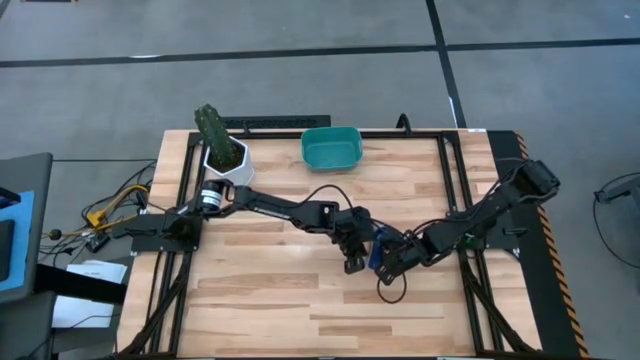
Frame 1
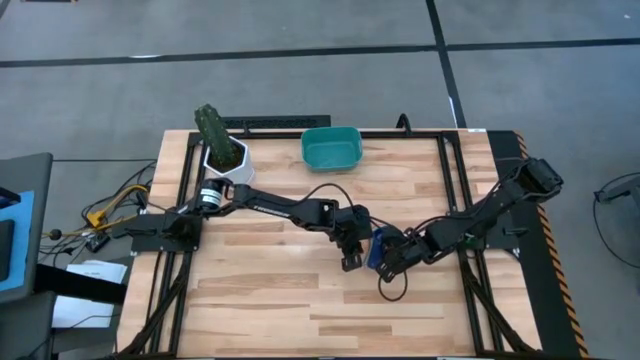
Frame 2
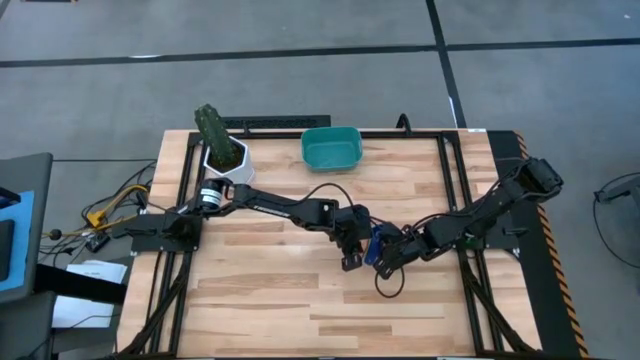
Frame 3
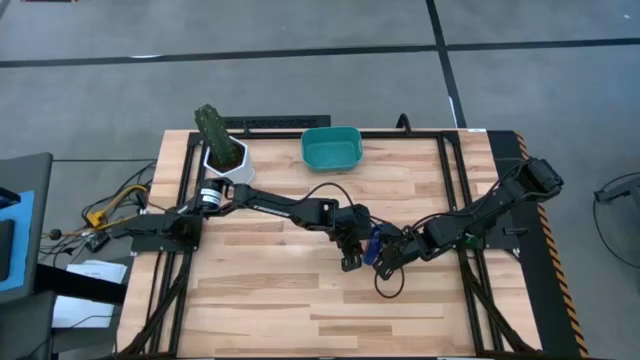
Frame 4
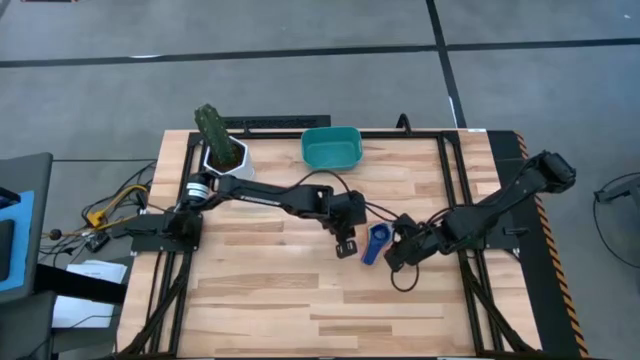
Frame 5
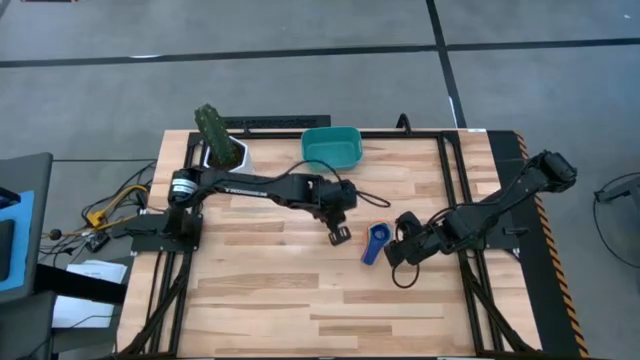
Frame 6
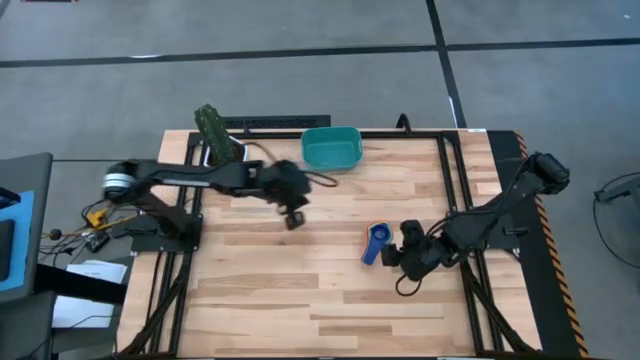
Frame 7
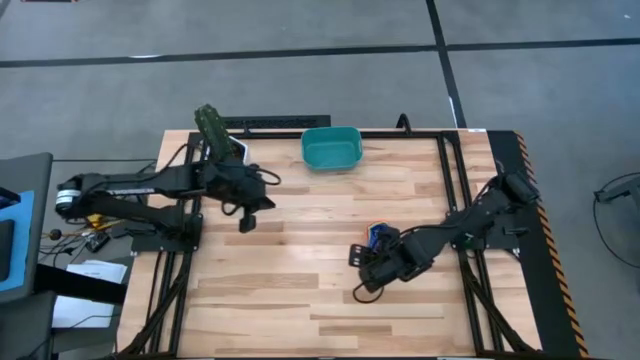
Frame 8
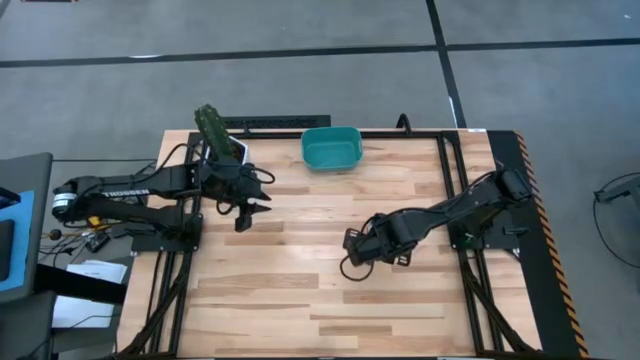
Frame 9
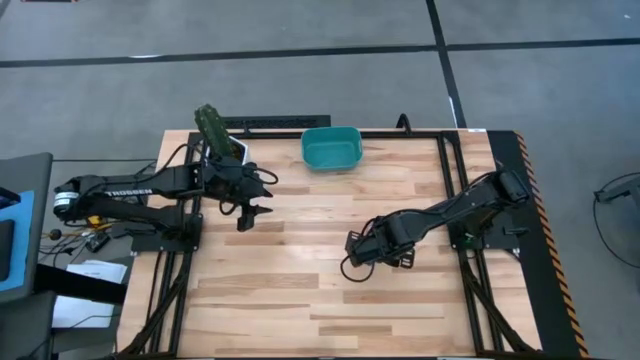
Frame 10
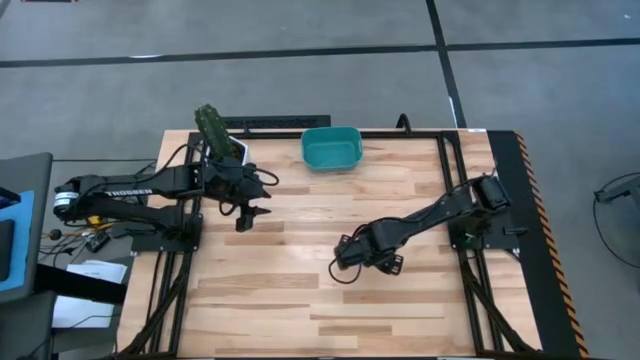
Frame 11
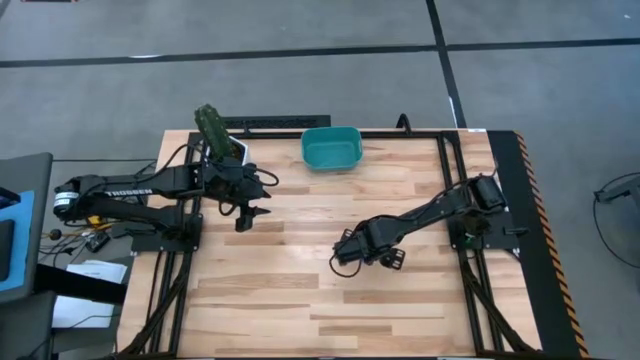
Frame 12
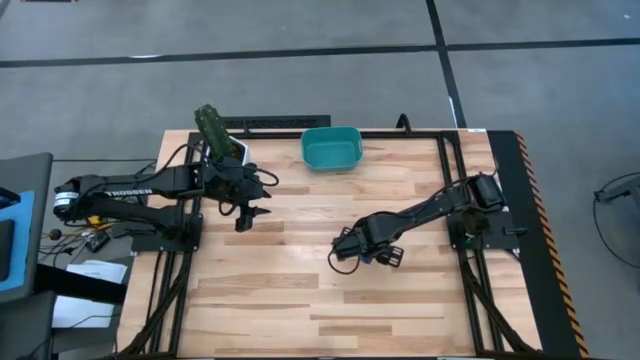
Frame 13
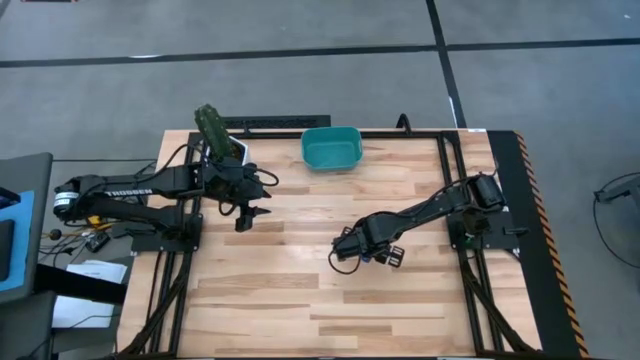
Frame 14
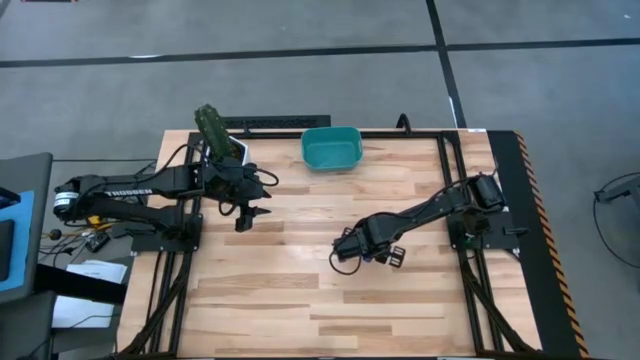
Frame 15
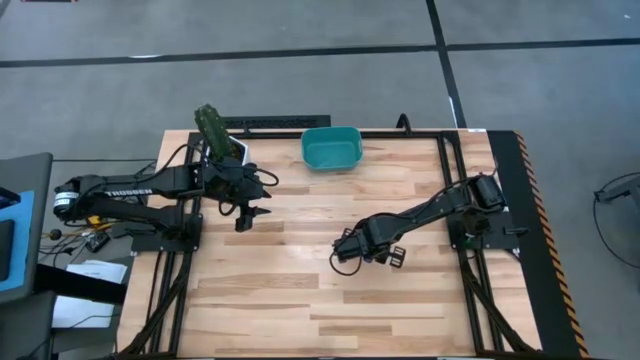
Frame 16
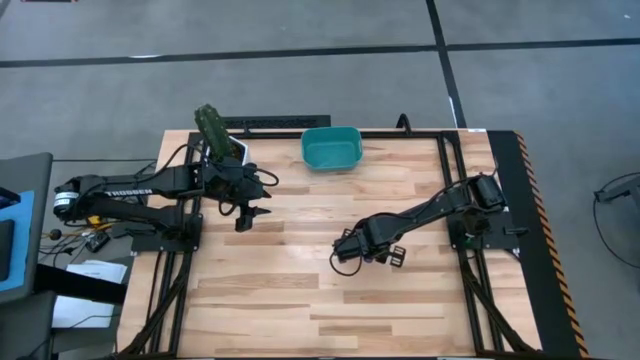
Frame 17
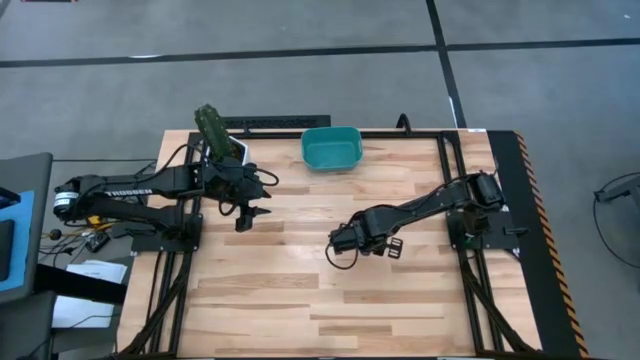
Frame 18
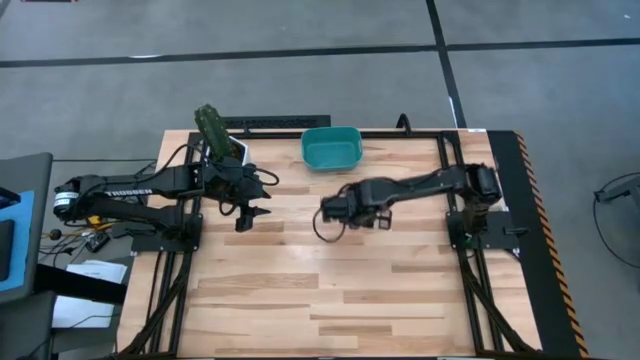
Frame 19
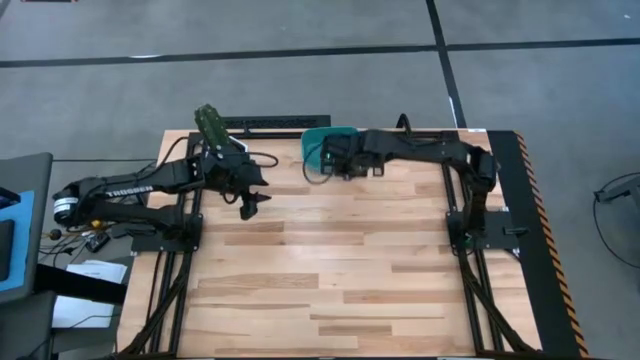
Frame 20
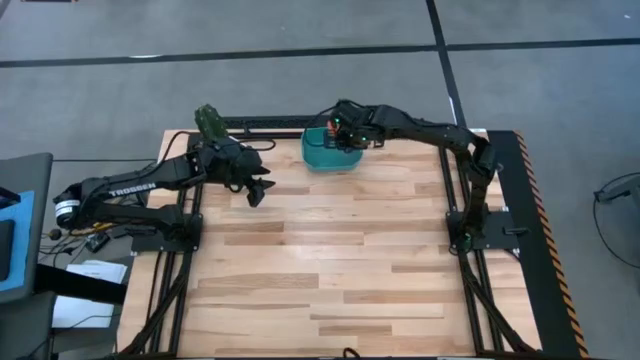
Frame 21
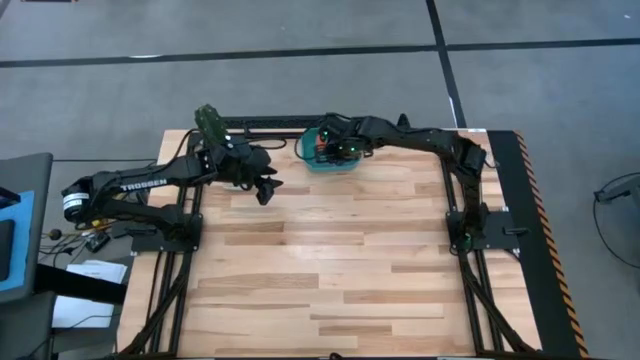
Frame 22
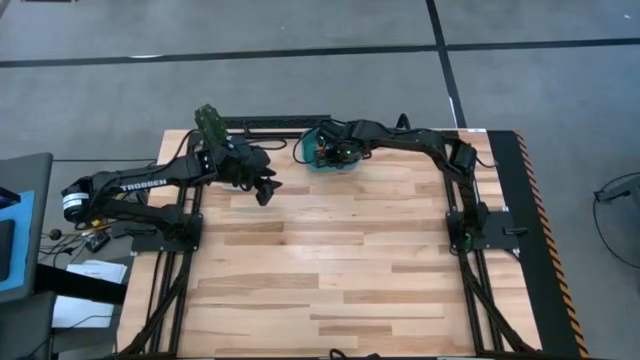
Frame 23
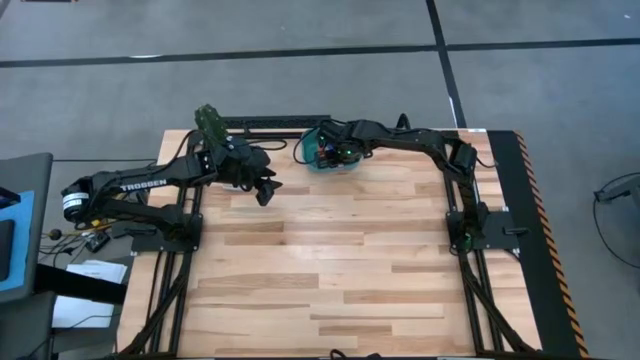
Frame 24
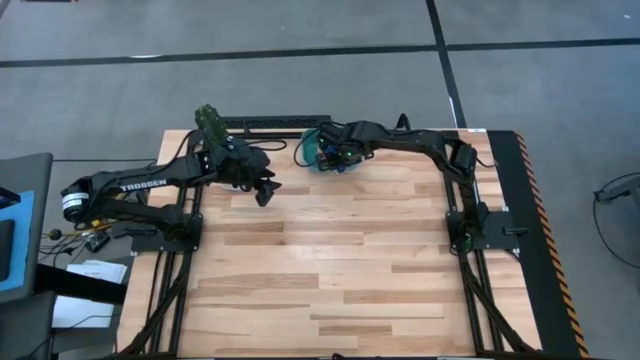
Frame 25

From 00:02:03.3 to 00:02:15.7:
Task: Nest measuring cups in basket
Put the stacked measuring cups into the blue bin

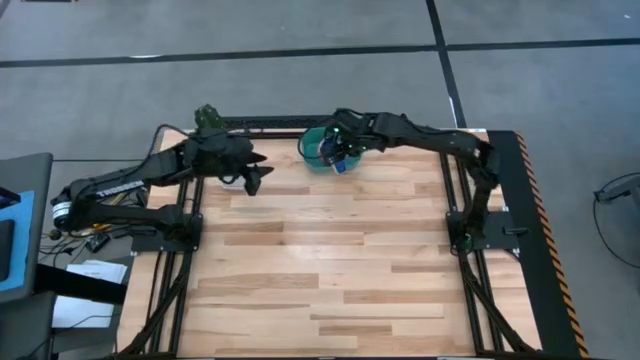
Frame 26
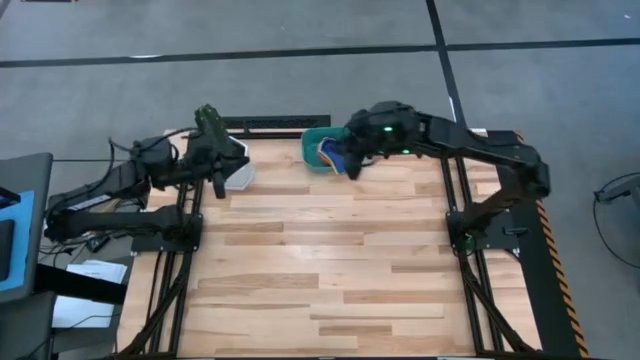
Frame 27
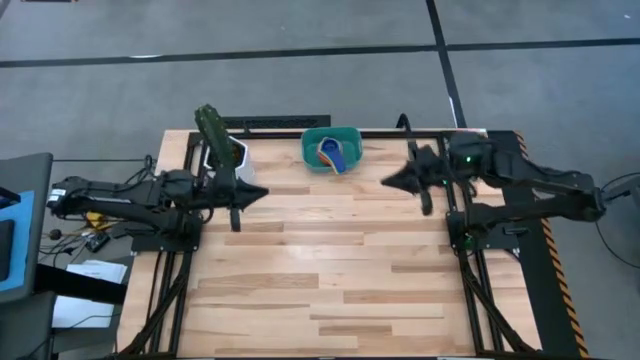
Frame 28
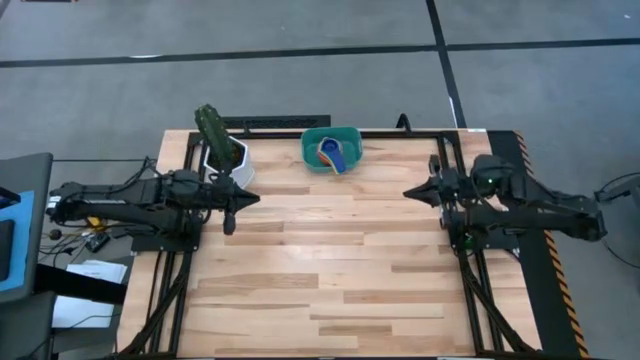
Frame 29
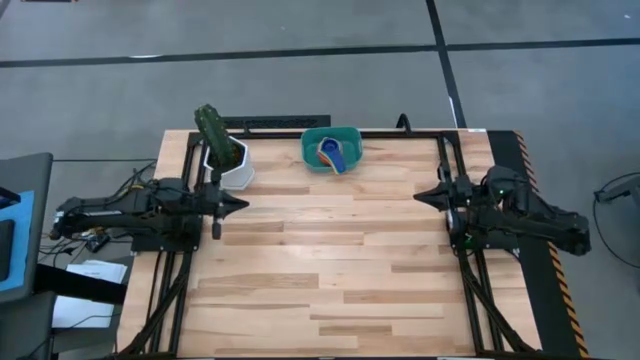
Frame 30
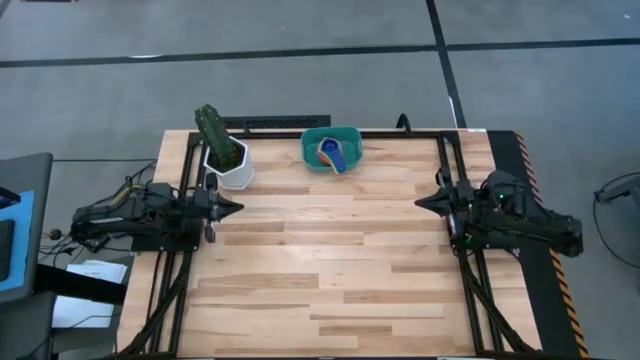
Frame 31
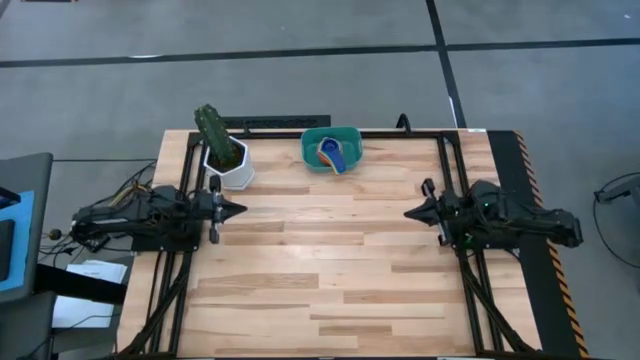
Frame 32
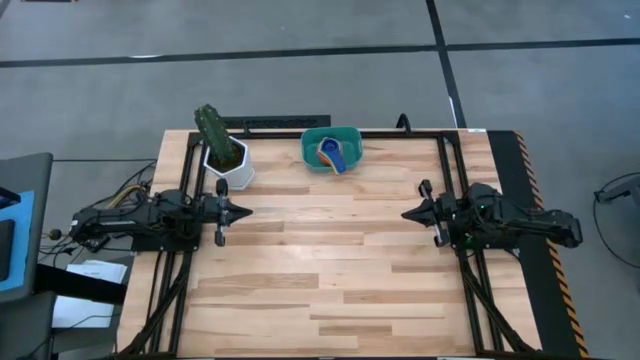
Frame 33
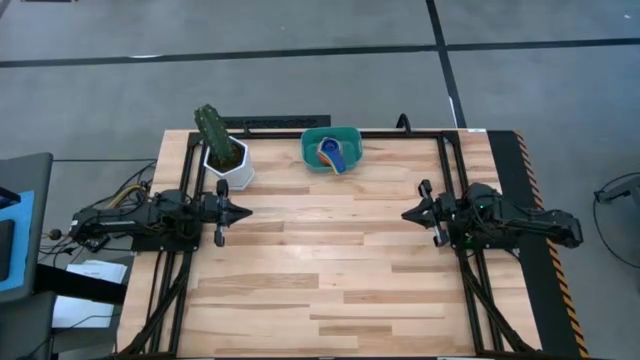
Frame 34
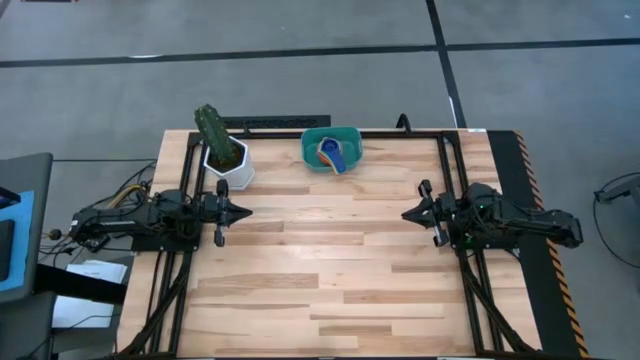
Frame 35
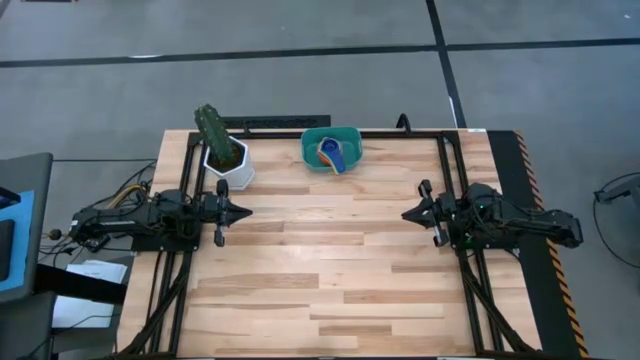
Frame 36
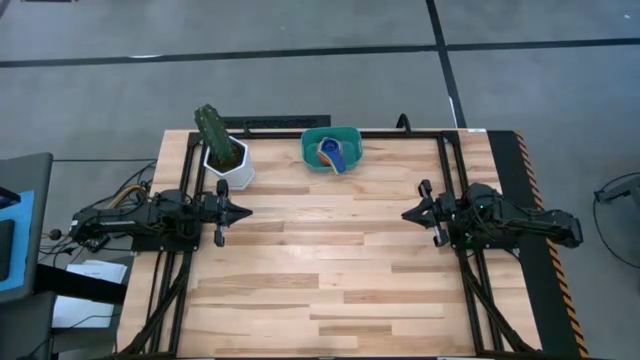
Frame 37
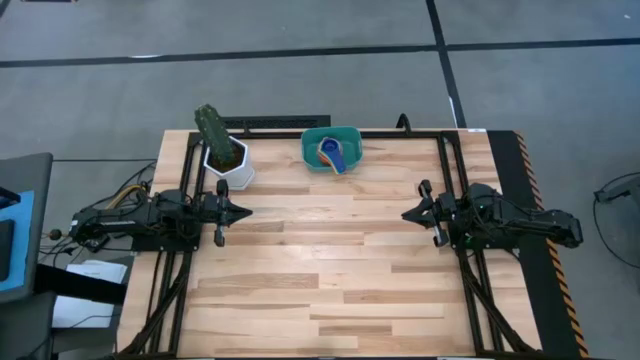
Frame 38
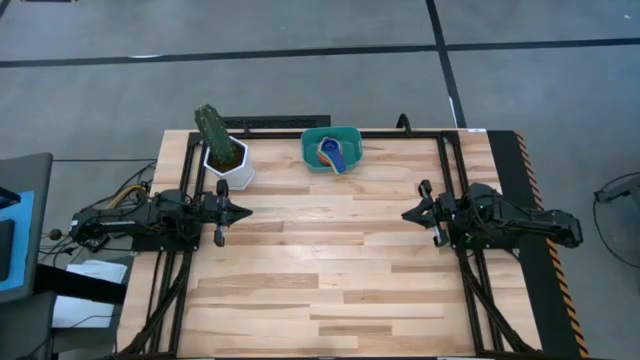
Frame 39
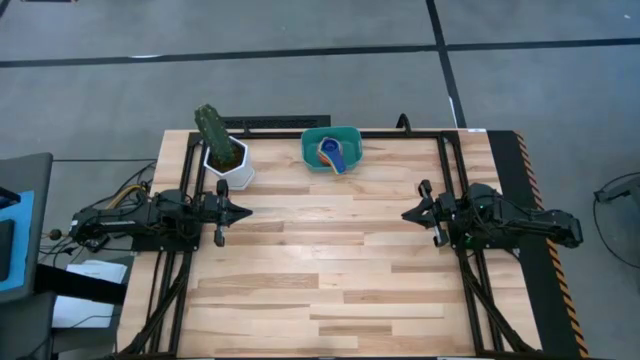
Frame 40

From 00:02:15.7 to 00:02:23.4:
Return to Home Position

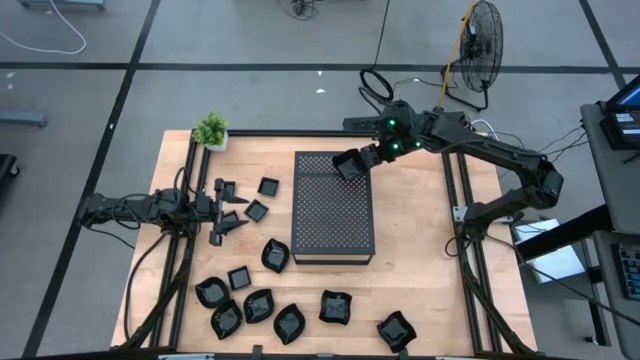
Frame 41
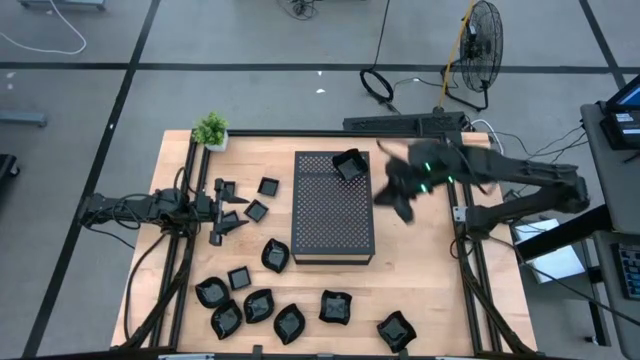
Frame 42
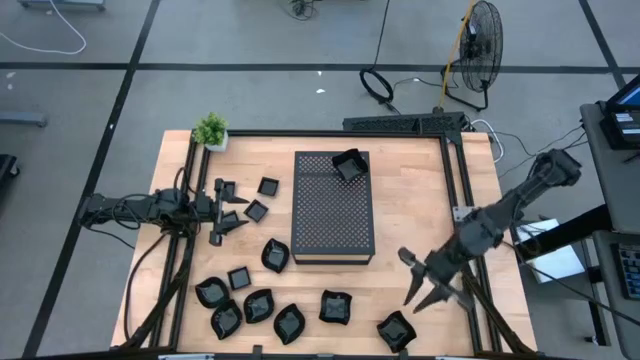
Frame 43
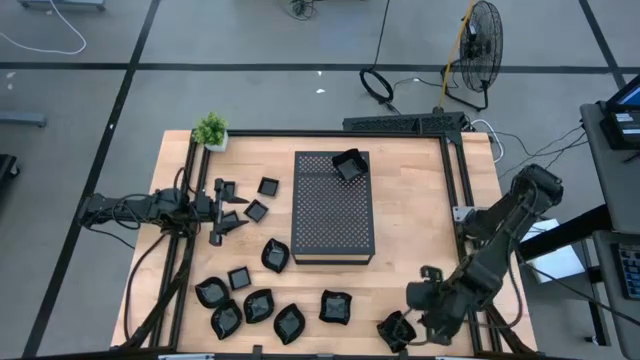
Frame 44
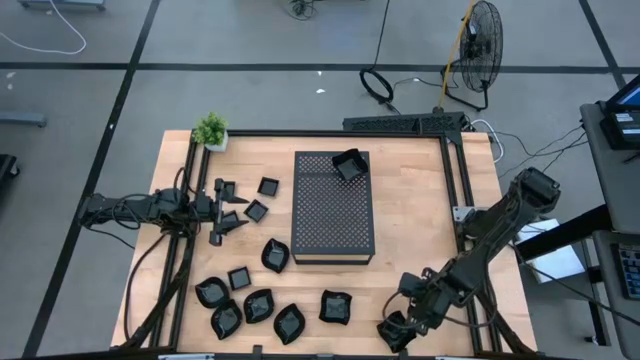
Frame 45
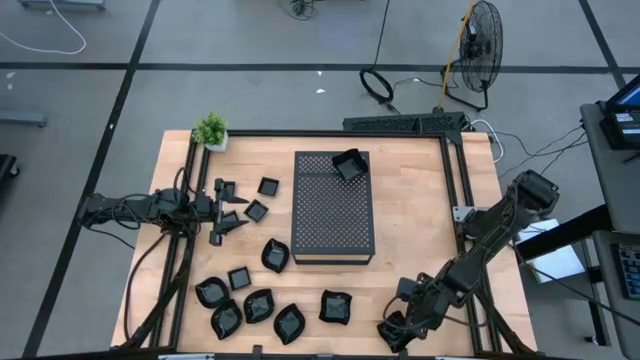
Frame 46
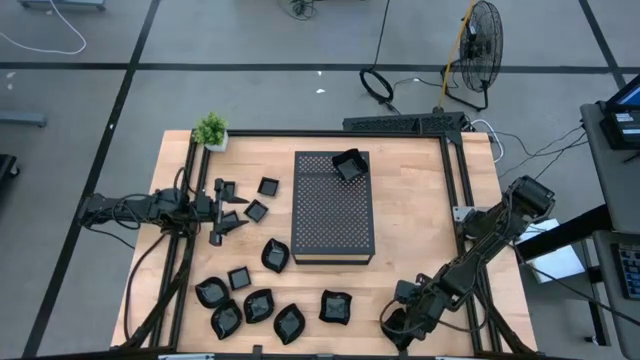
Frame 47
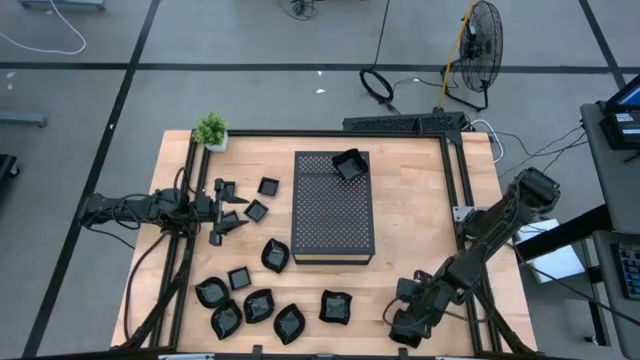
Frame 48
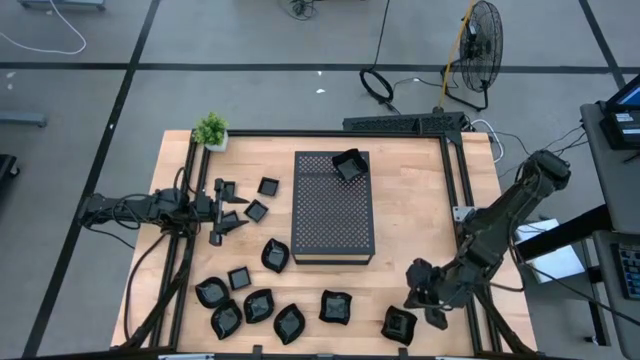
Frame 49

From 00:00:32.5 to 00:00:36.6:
Task: Pick & Place Mini shaped plates
Stack the black distorted square plate on top of the black distorted square plates on the shelf
